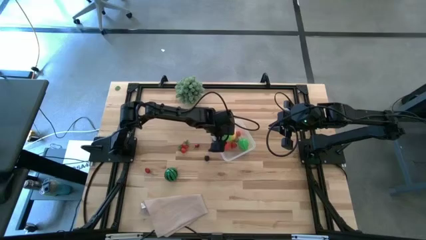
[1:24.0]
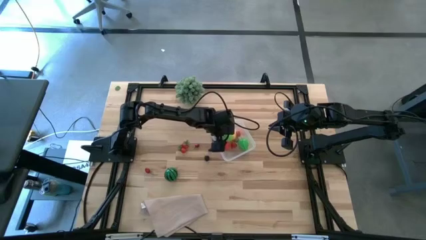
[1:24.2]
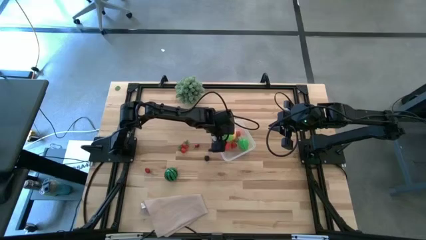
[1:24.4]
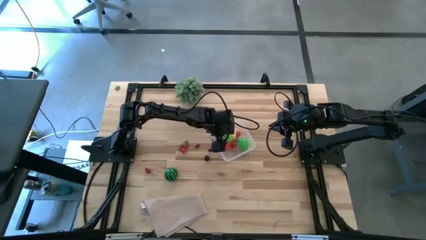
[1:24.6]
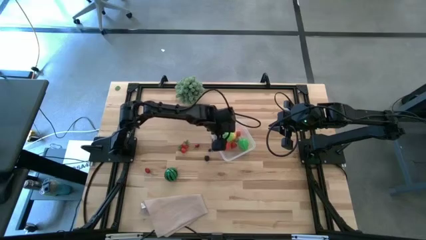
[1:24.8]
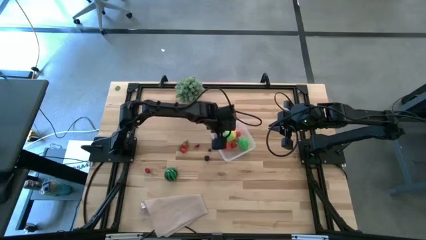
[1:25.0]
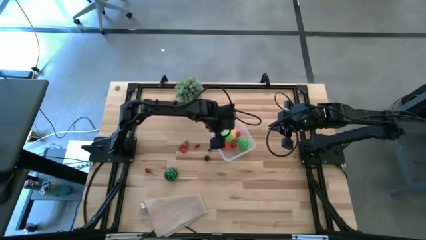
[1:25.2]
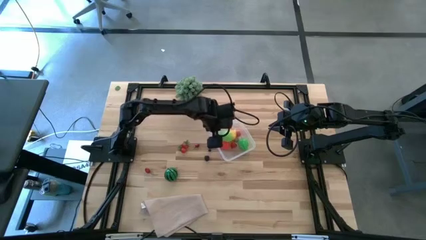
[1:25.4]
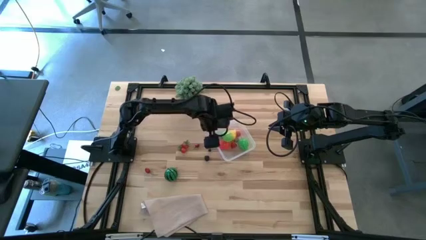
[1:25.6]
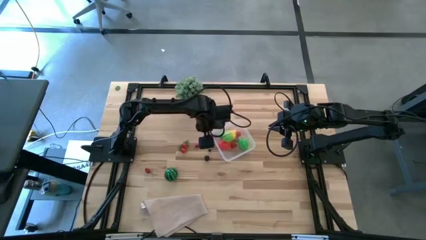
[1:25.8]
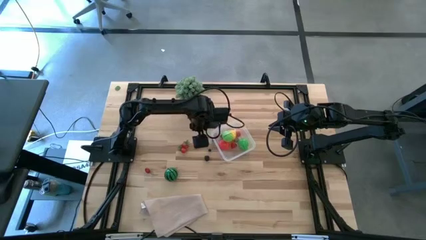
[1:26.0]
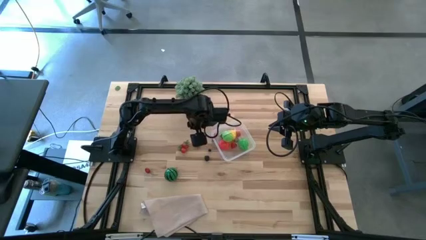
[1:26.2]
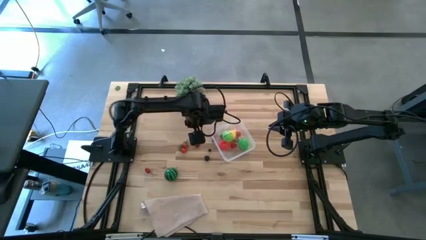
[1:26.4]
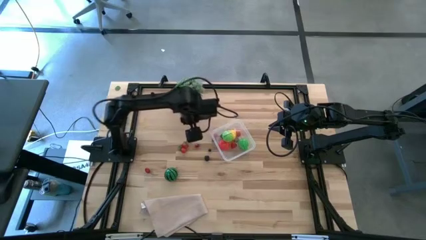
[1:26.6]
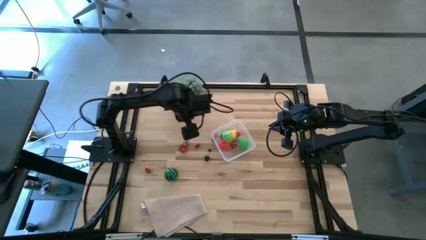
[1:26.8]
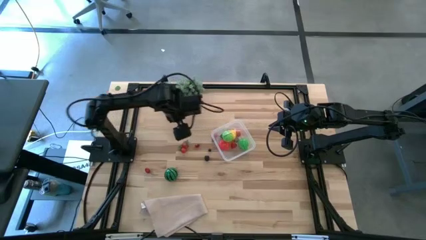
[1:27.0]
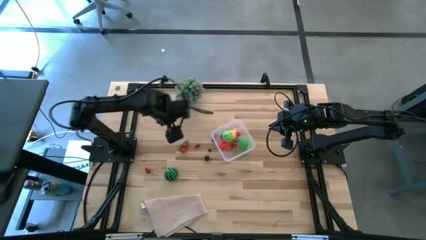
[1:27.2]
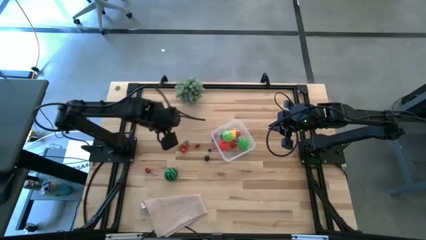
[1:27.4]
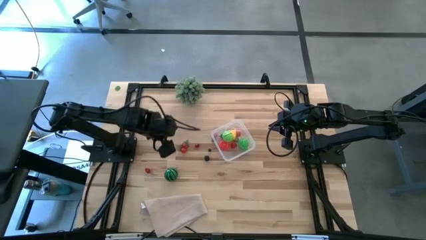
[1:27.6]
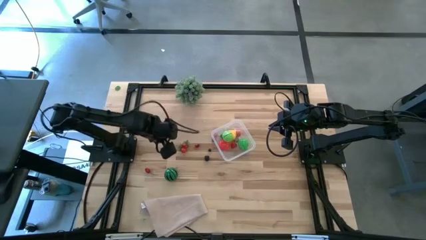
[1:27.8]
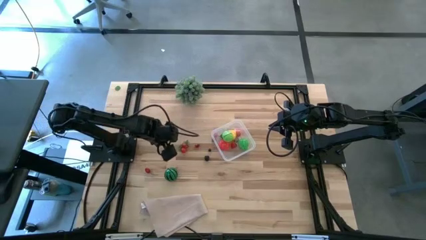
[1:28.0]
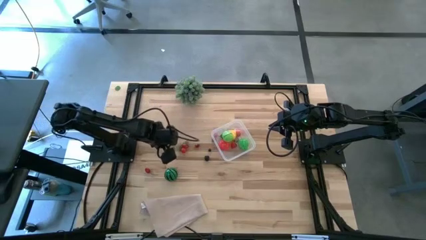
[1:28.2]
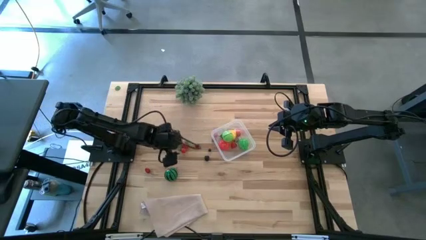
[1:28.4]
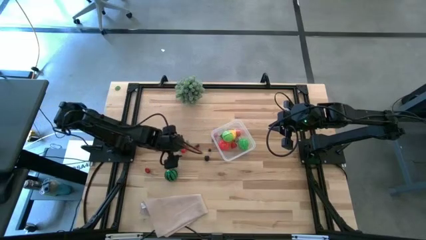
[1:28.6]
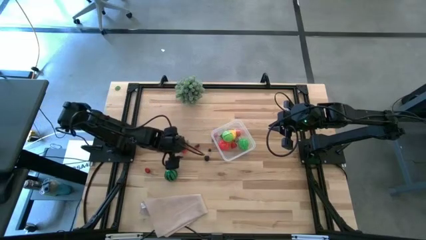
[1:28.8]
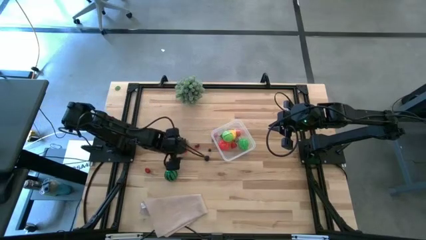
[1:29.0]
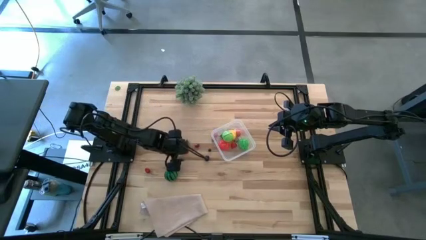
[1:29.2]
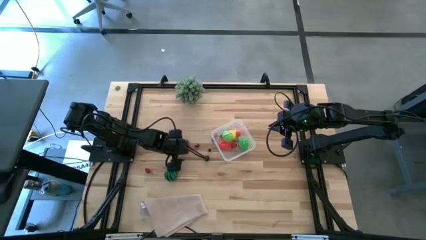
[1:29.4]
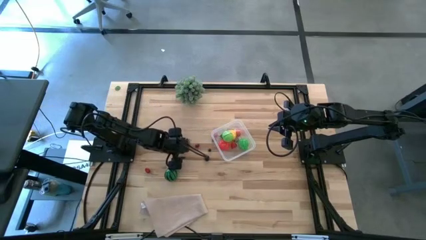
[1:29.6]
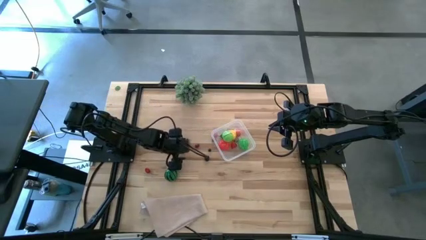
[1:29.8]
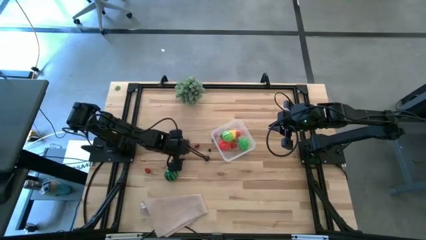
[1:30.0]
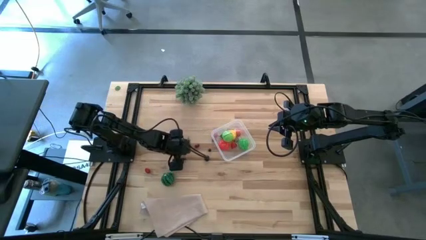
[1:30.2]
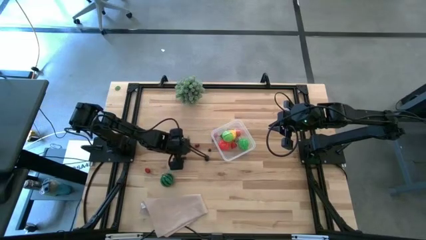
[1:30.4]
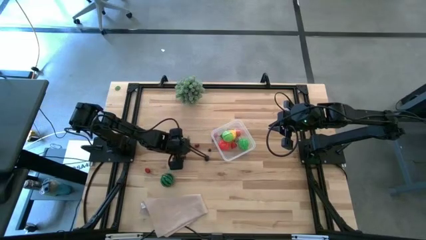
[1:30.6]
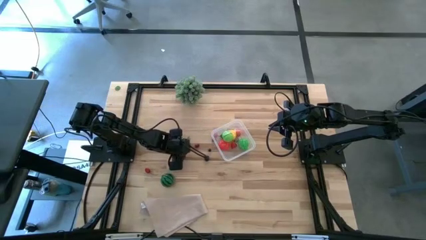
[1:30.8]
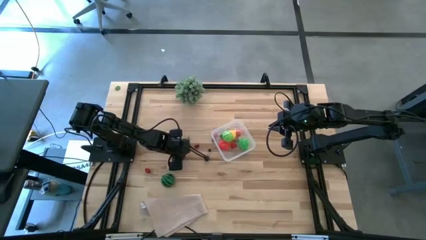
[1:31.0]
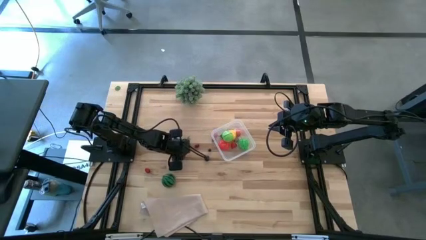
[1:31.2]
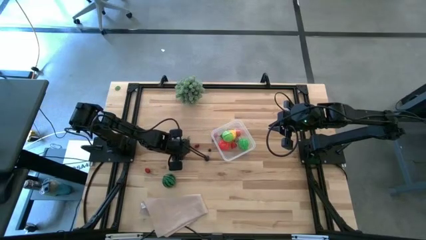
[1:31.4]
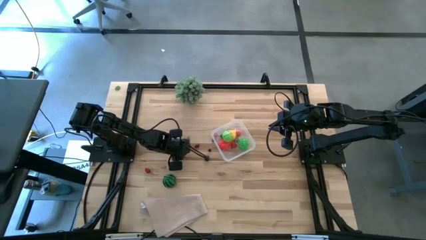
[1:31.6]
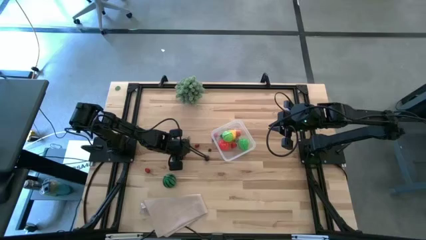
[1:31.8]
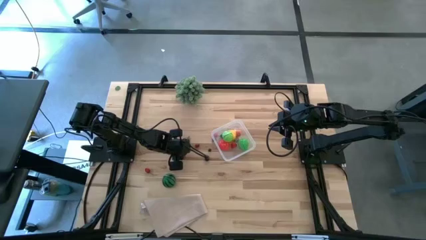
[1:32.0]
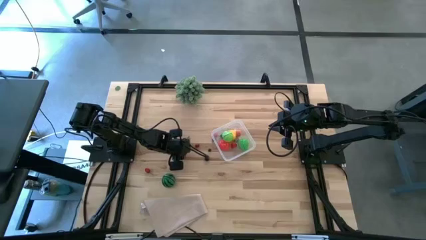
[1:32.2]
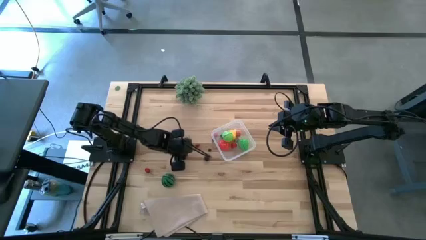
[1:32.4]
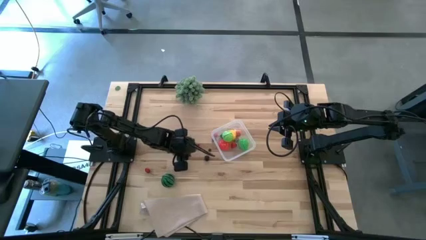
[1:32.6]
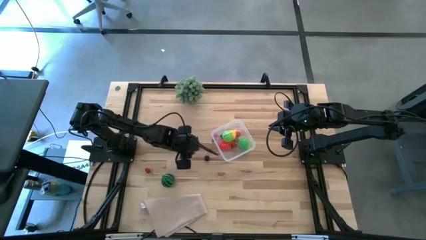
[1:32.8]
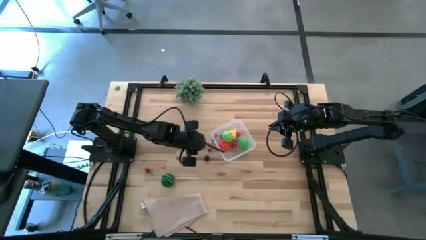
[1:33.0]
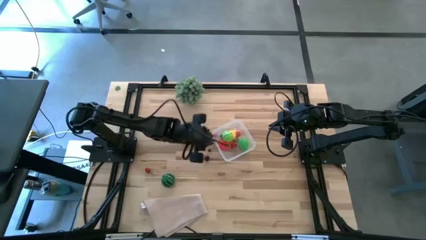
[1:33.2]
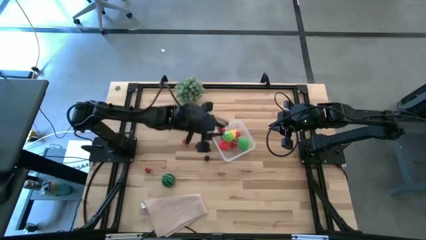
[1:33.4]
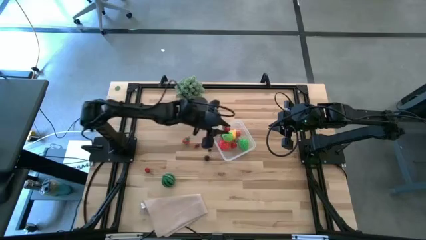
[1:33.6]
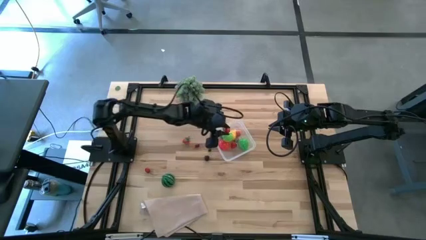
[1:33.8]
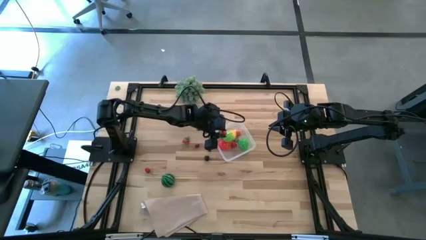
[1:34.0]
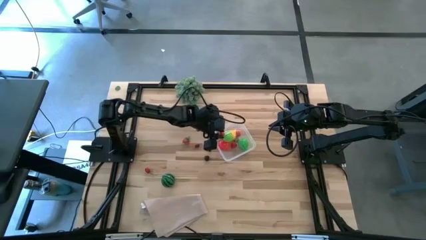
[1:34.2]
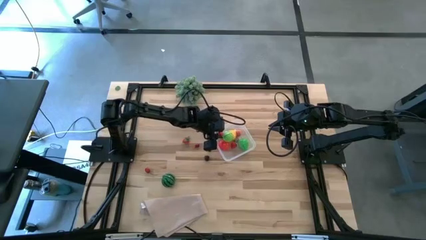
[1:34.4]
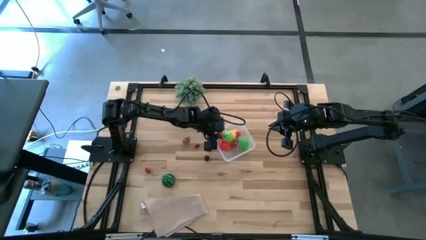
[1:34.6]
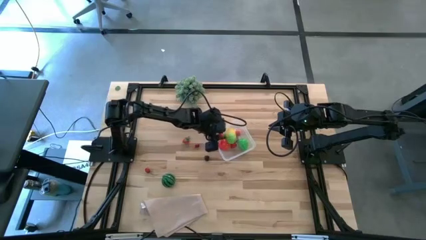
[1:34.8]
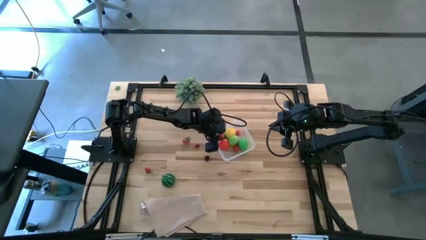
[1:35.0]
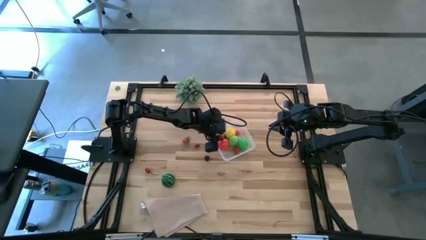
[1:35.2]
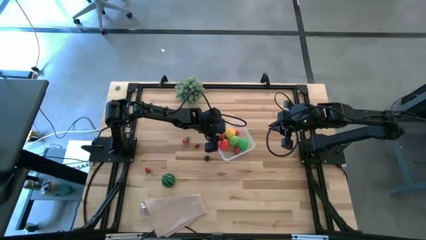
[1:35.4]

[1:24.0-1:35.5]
Task: Pick and placing Produce into tupperware
Put the cherry tomato into the transparent bin

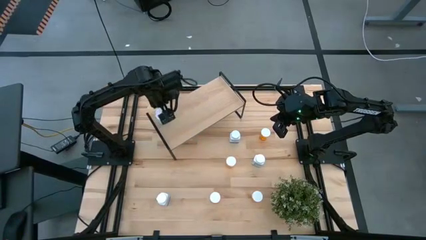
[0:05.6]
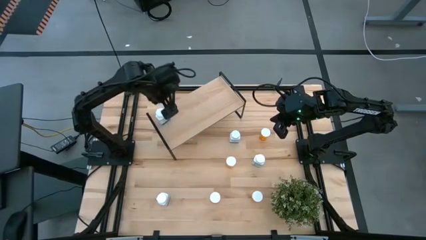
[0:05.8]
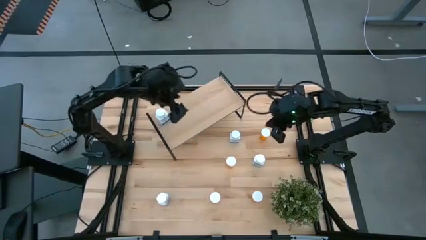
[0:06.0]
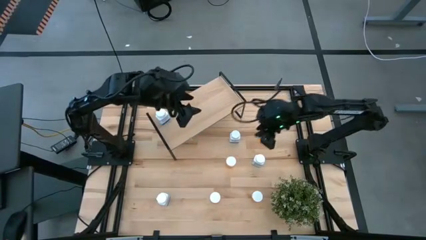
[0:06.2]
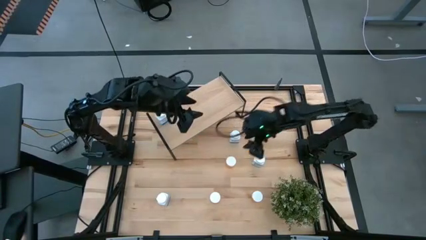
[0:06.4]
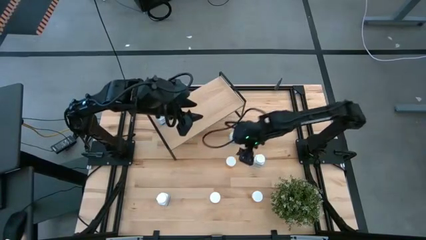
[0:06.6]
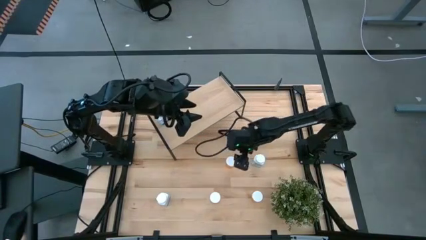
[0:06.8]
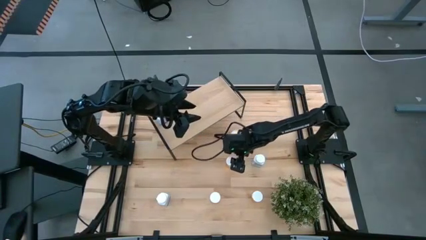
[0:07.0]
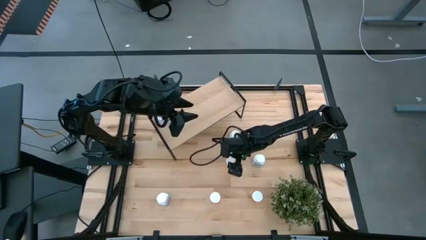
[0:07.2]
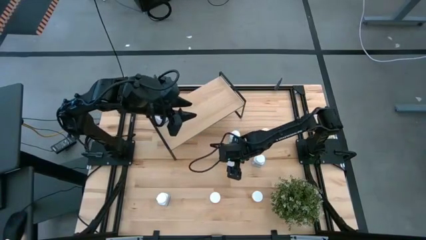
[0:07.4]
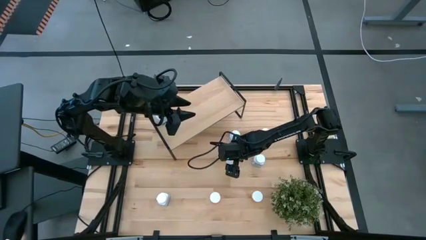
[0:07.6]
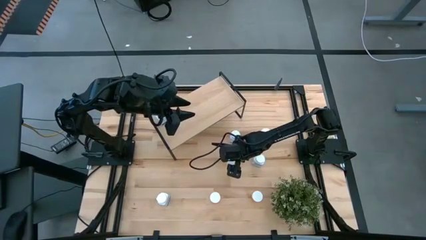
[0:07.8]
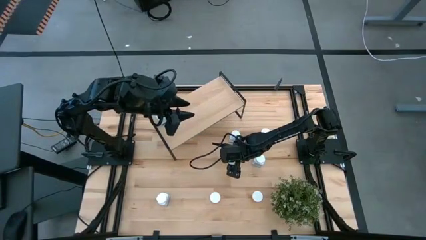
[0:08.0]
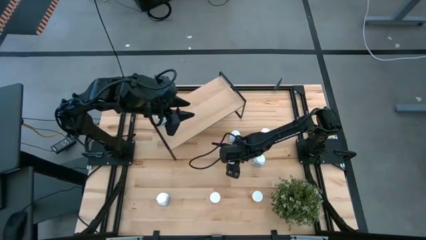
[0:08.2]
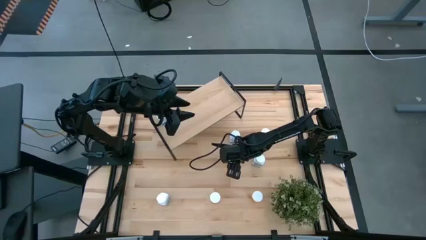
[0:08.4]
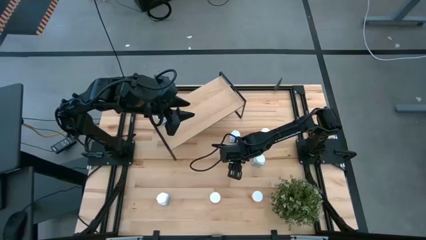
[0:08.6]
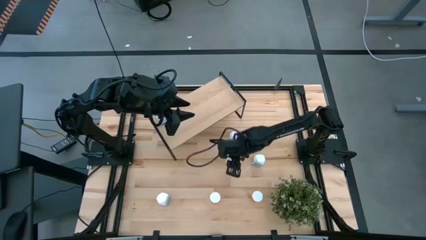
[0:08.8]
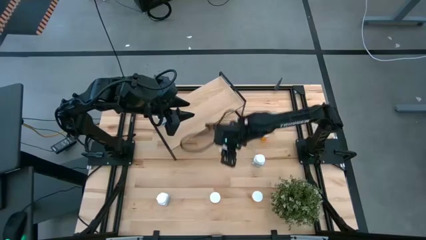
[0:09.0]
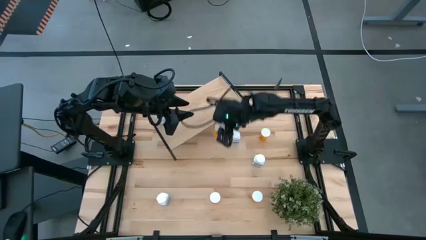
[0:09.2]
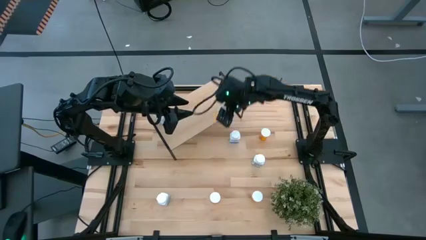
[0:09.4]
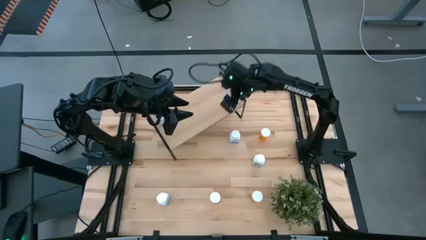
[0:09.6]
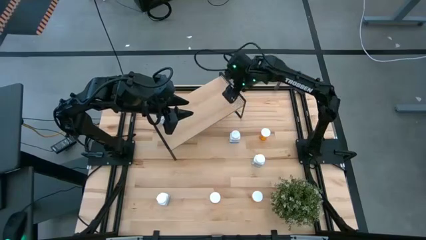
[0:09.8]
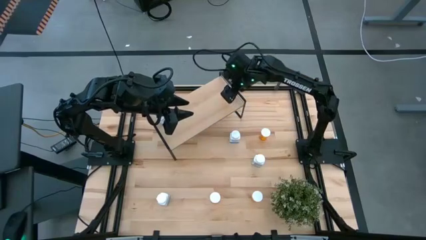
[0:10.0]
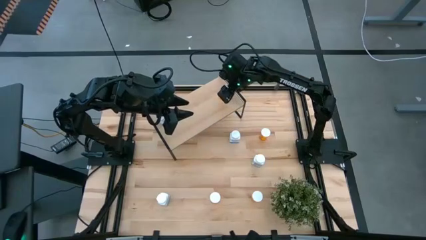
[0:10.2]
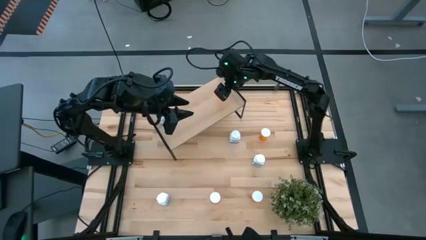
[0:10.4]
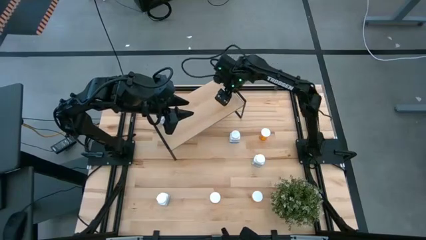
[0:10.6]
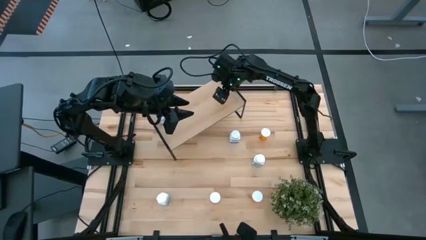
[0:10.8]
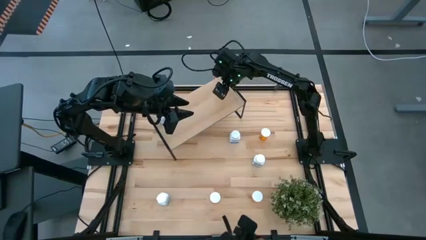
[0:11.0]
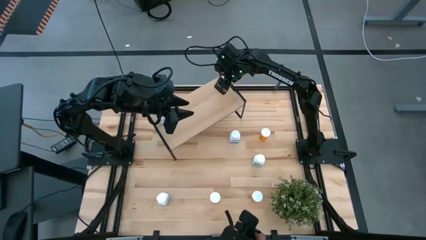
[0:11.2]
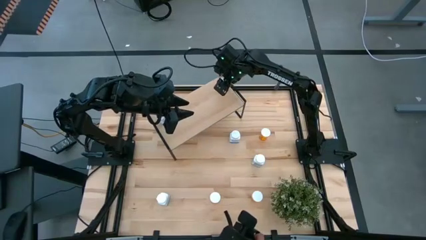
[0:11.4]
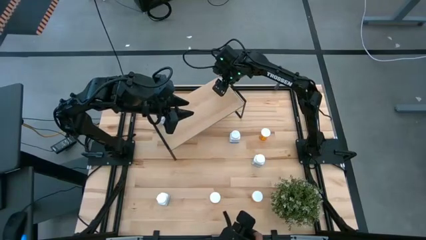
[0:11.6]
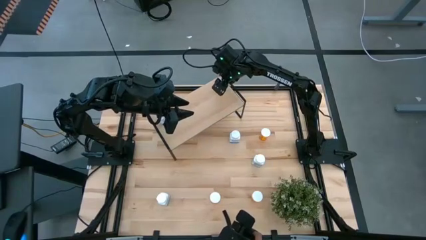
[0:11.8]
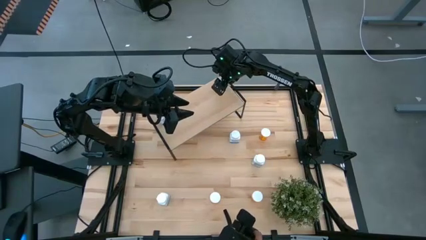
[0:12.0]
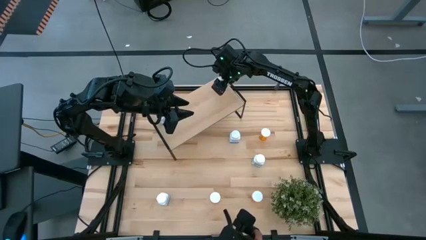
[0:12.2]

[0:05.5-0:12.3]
Task: Pick and place medicine bottles onto shelf by color
Put the orange pill bottle on the shelf
